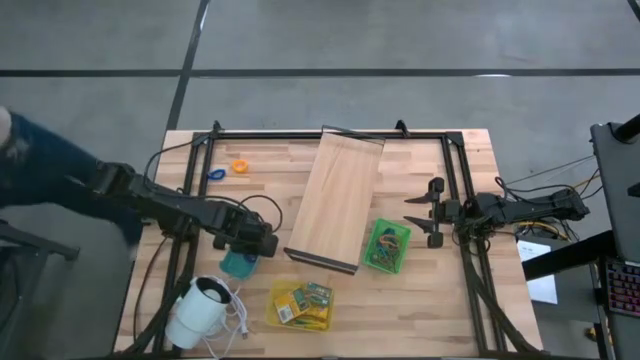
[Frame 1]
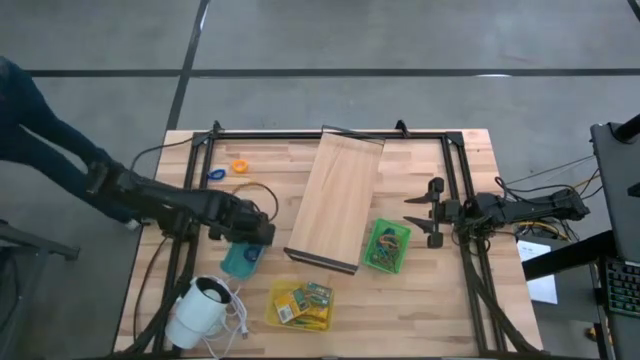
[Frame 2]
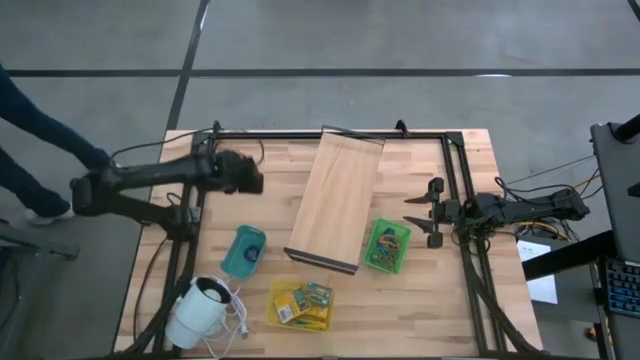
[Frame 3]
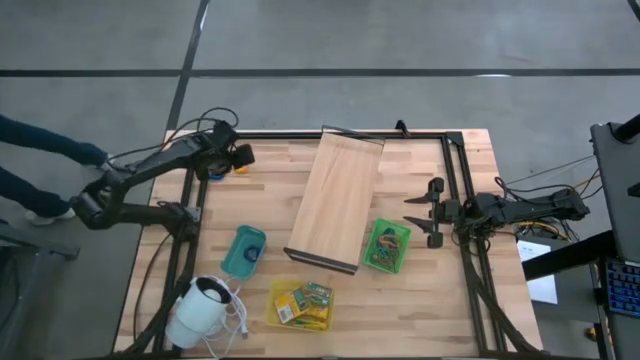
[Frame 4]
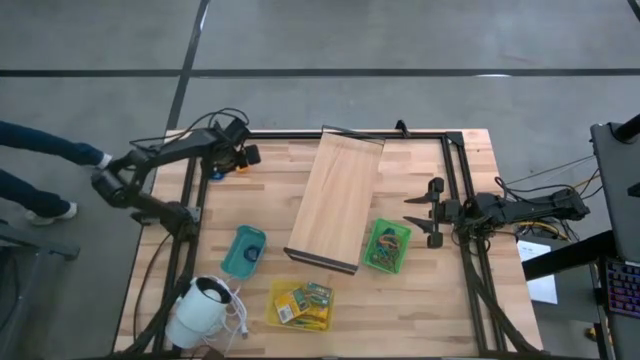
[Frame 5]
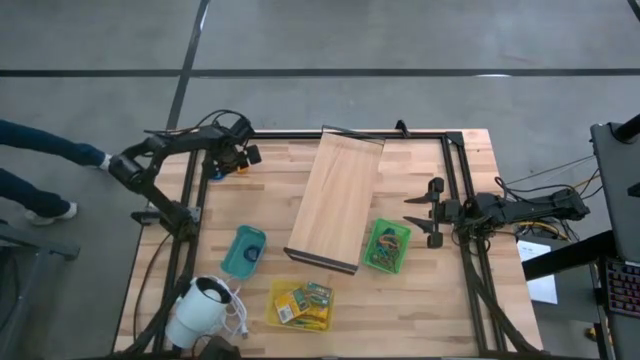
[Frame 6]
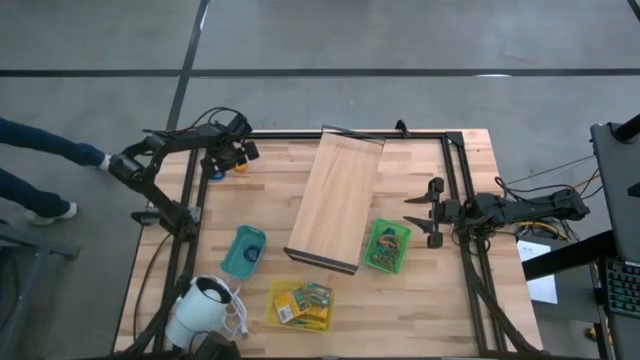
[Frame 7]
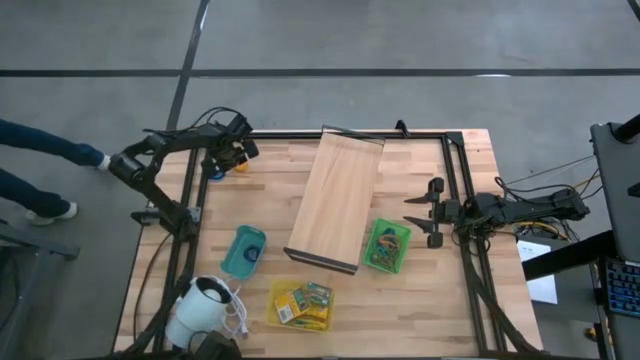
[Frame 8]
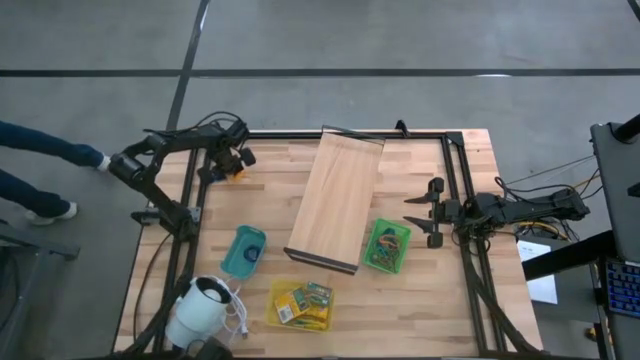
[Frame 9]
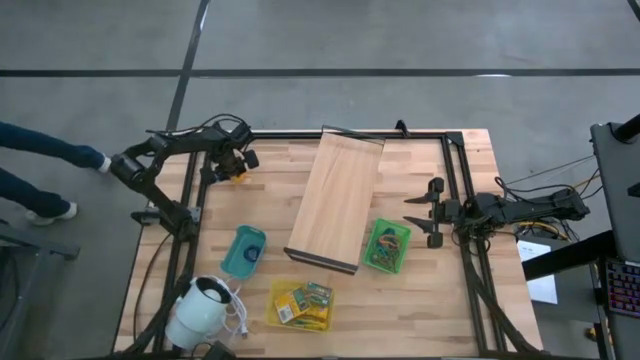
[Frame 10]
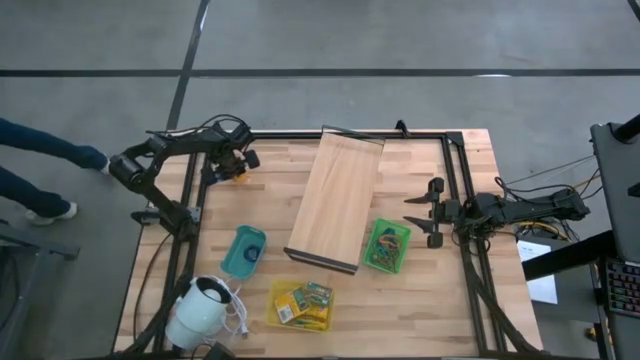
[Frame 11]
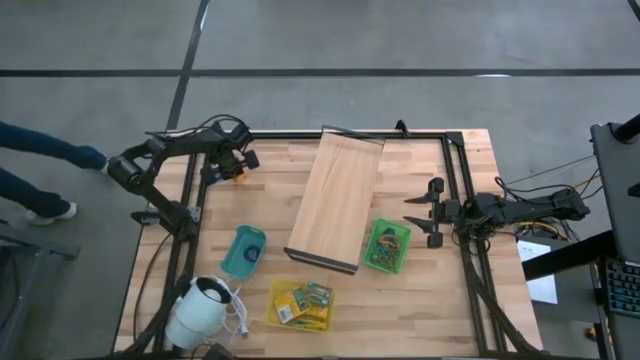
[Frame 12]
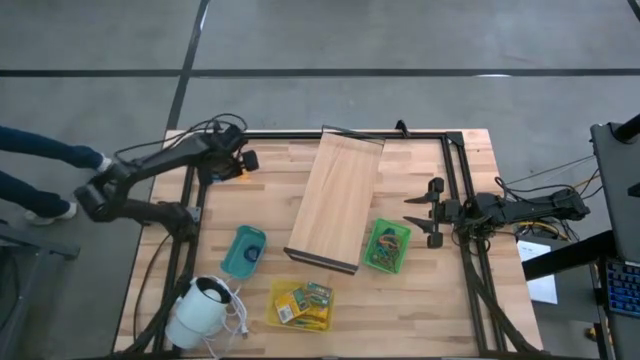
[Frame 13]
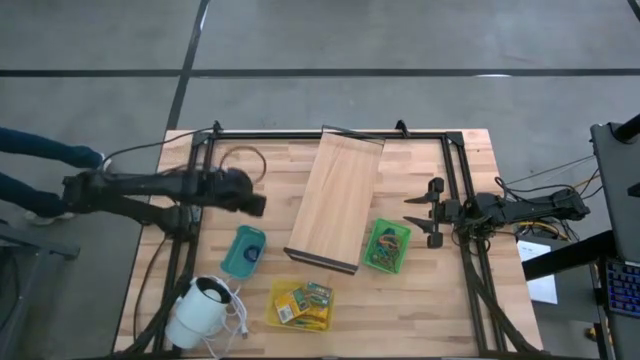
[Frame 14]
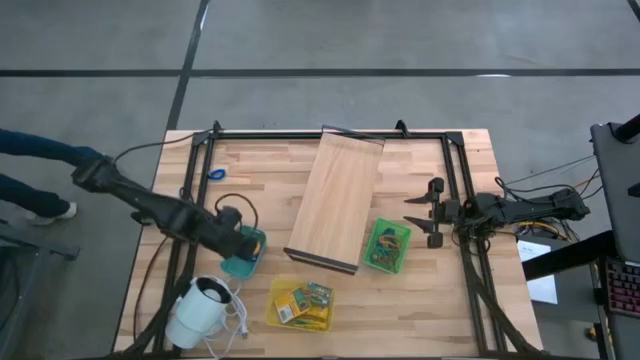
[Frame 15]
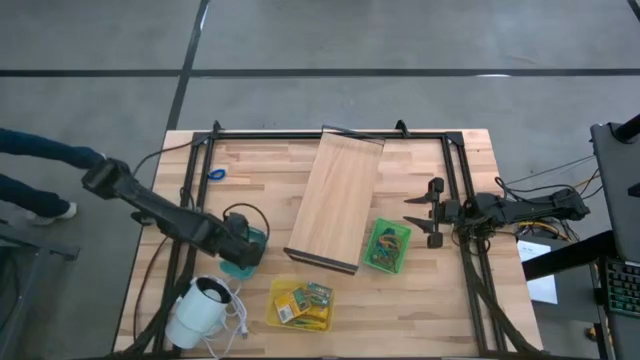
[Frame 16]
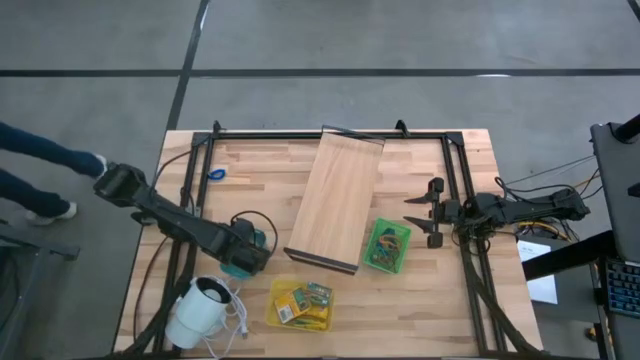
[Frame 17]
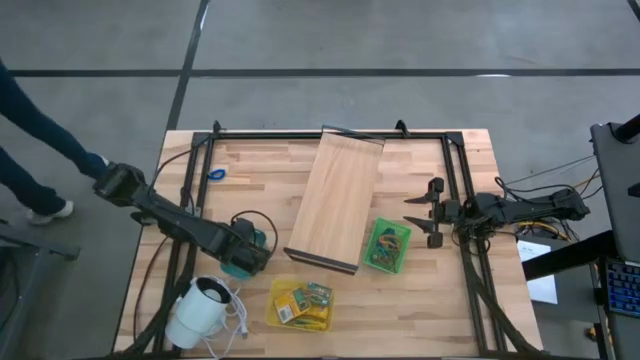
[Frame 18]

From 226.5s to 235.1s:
Task: Pick & Place Office Desk Supplies
Put the yellow spring keychain into the blue bin

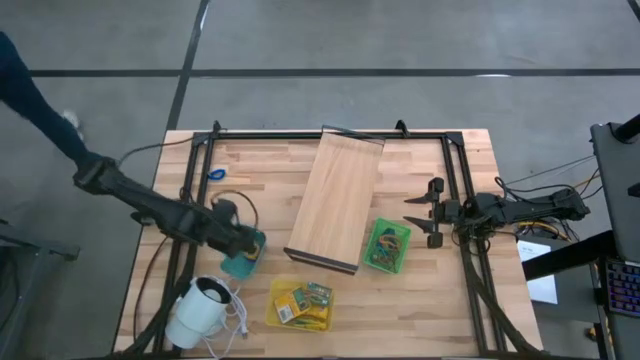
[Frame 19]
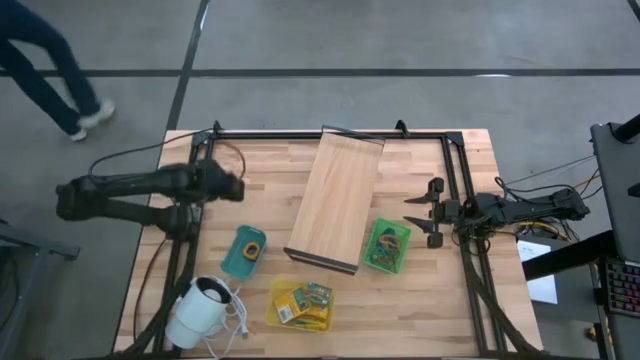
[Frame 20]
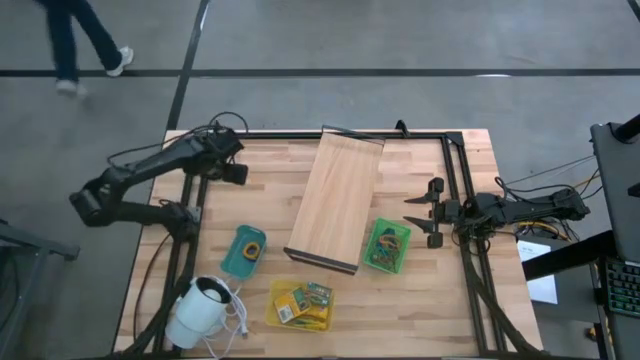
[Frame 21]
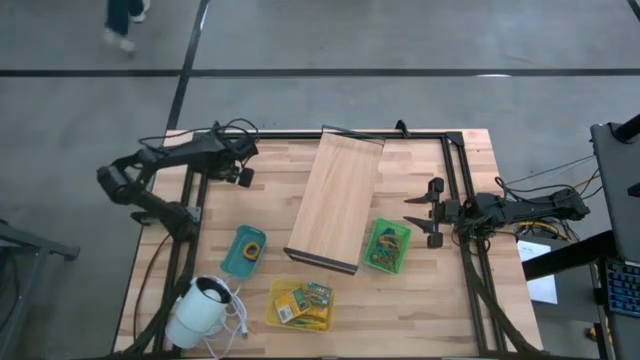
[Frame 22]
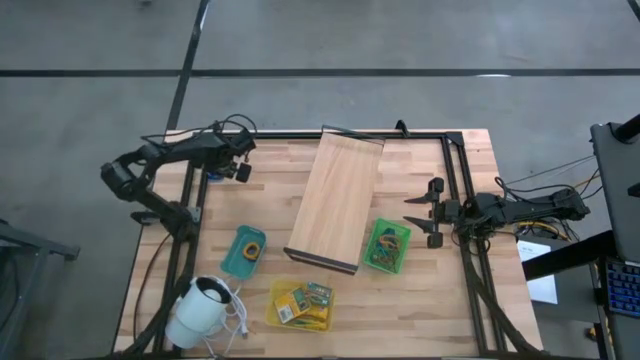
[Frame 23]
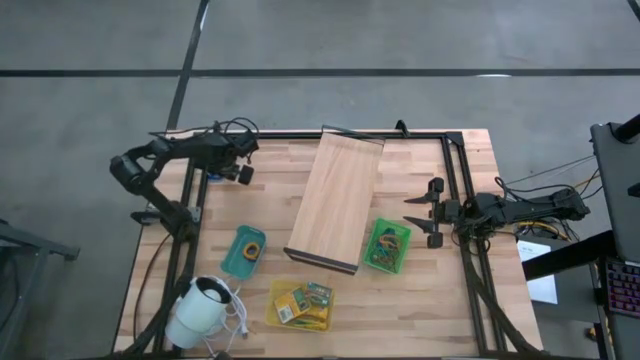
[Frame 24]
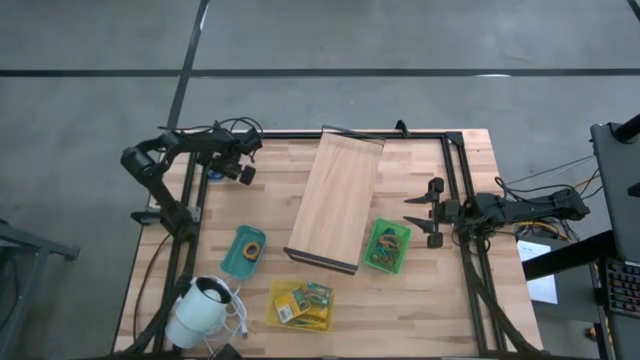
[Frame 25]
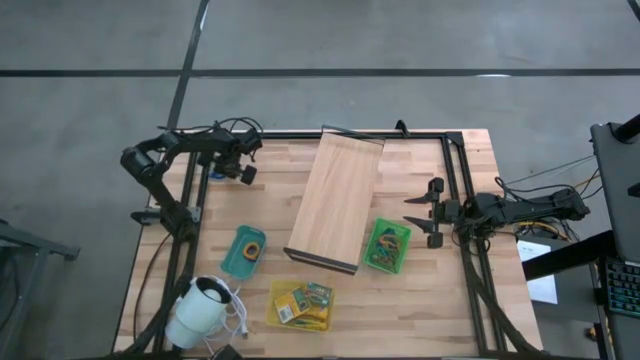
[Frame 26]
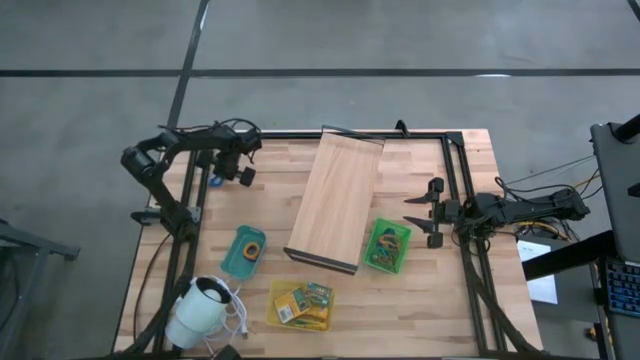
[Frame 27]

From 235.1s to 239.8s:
Put the blue spring keychain into the blue bin

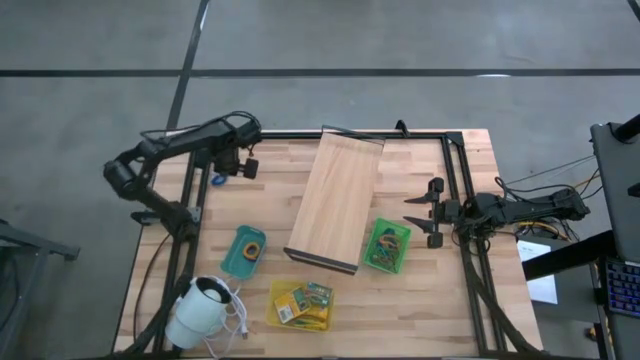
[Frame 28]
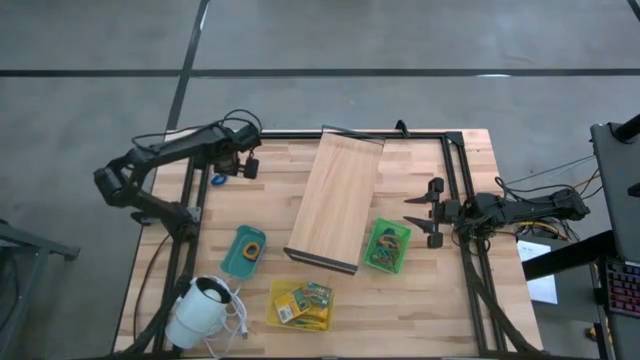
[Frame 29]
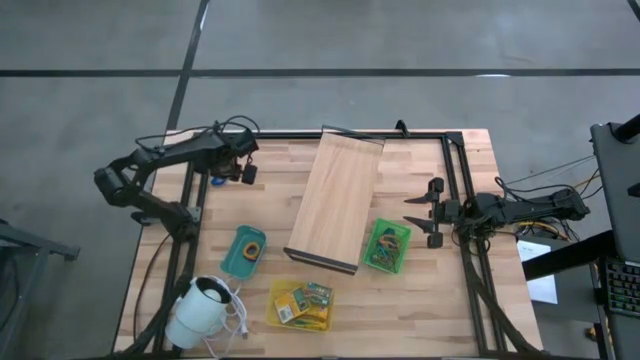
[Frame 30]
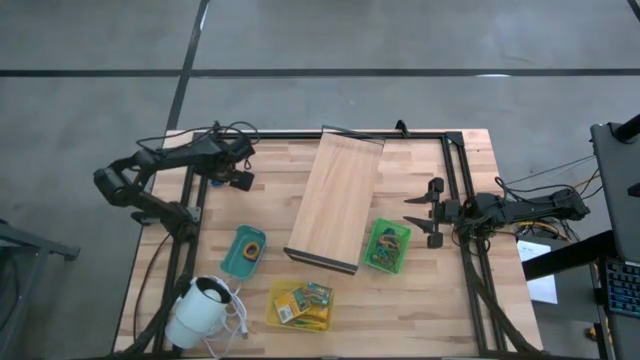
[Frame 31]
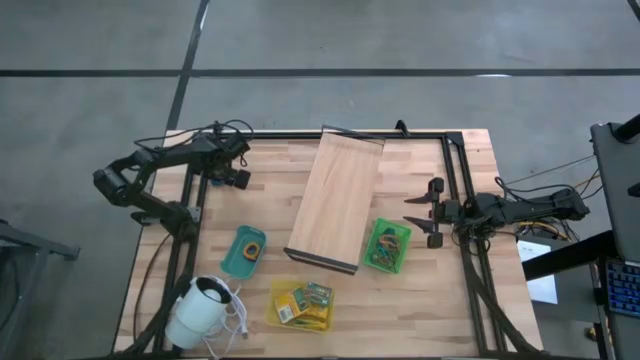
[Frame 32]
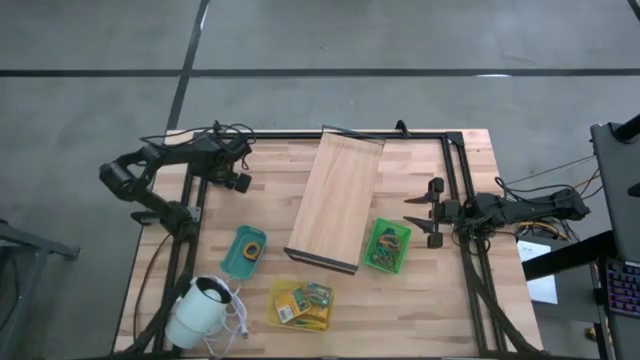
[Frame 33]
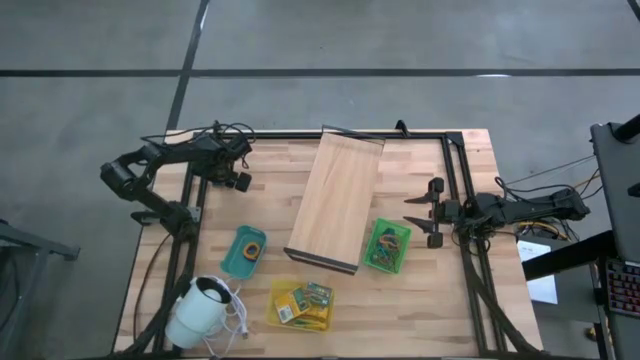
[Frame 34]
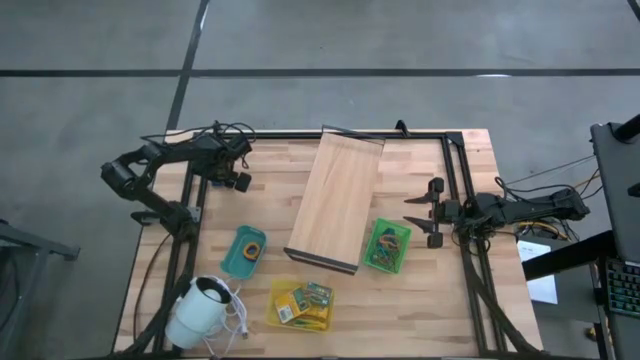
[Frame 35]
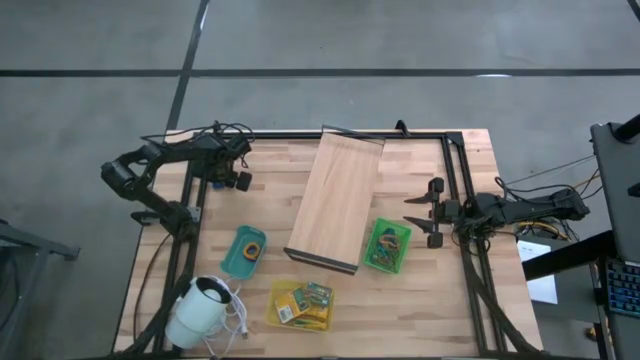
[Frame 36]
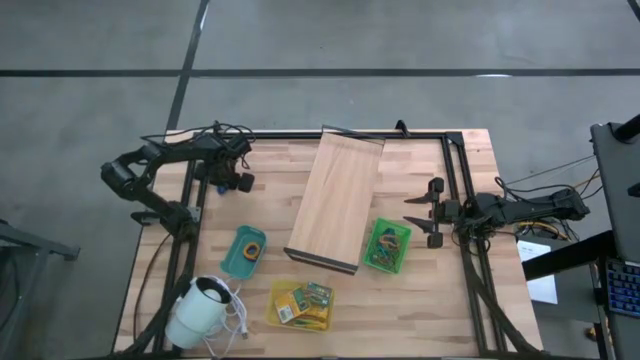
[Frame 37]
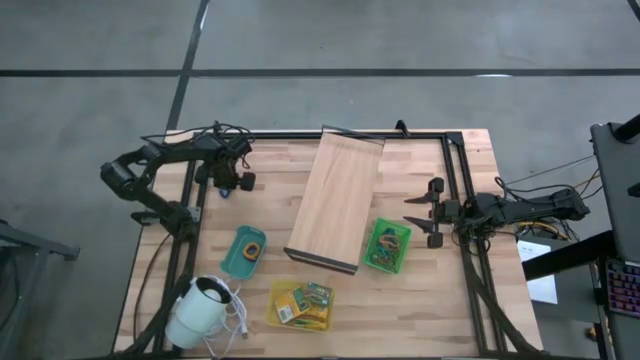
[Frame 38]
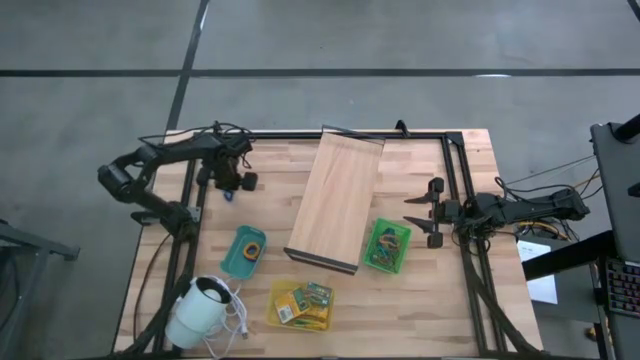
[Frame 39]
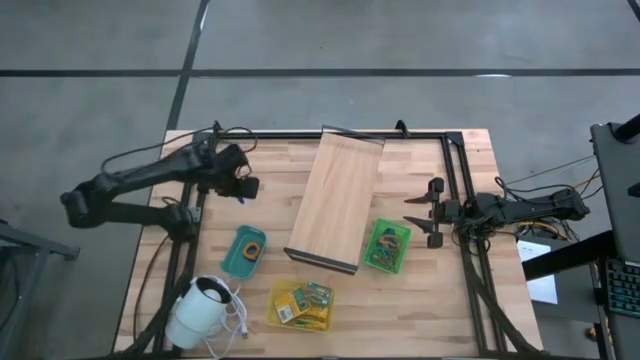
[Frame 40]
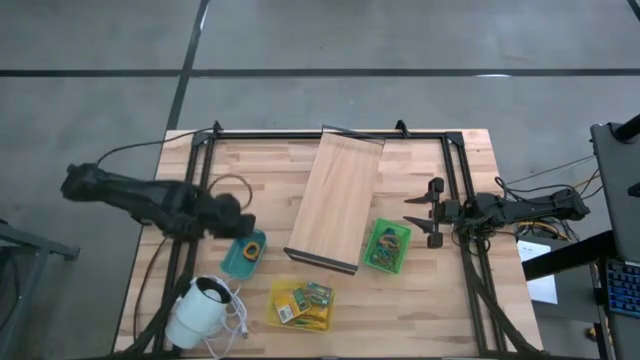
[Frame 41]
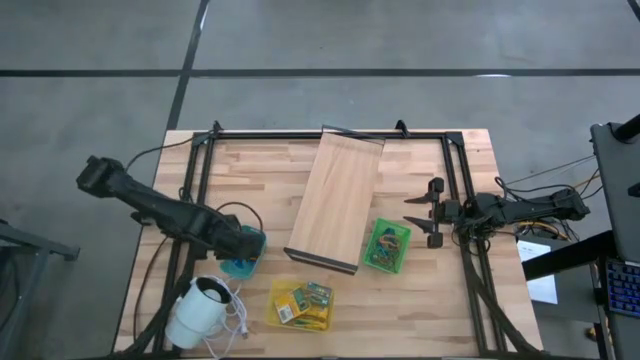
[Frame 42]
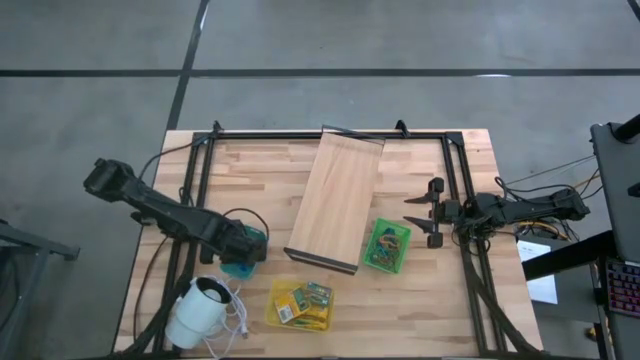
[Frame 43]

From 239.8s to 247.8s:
Put the blue spring keychain into the blue bin
